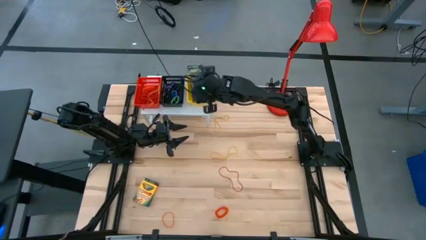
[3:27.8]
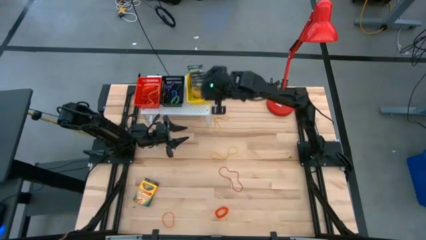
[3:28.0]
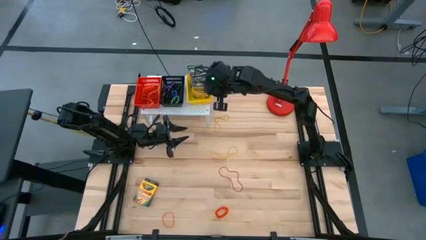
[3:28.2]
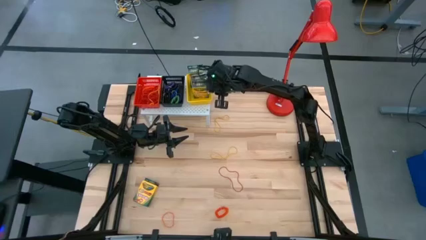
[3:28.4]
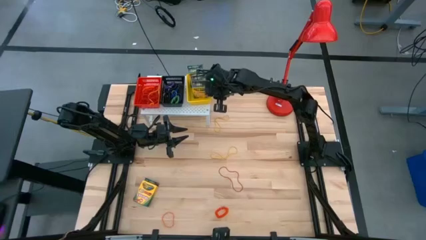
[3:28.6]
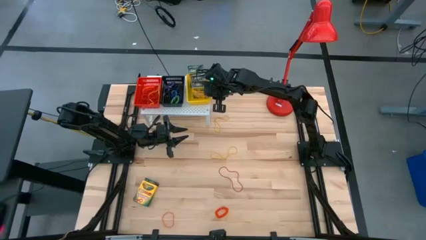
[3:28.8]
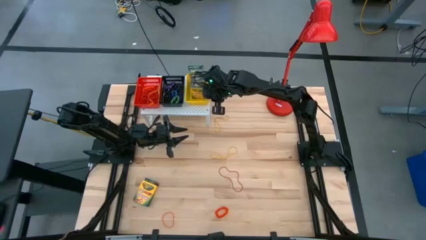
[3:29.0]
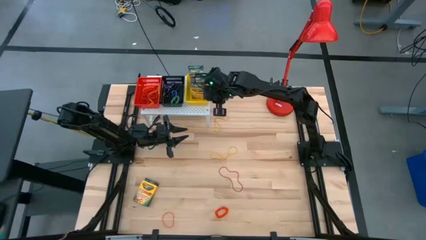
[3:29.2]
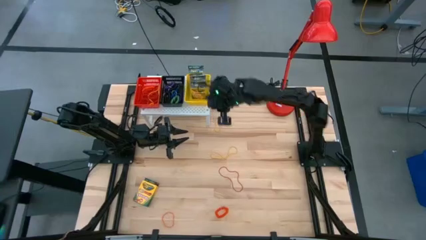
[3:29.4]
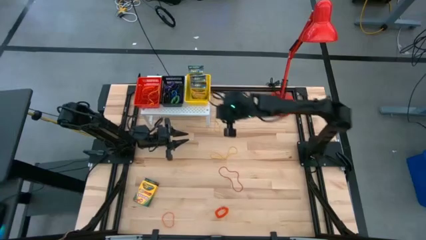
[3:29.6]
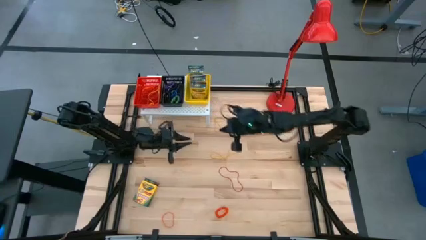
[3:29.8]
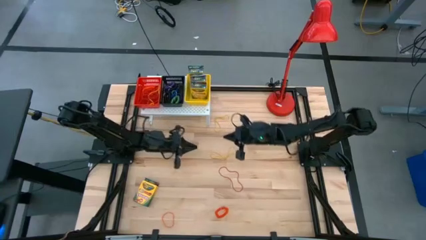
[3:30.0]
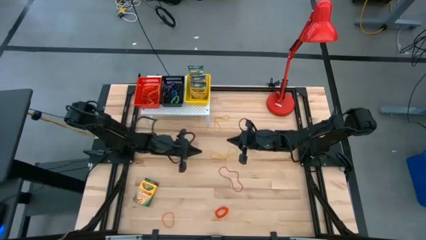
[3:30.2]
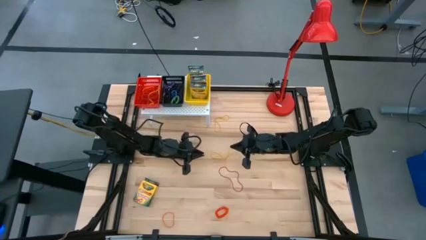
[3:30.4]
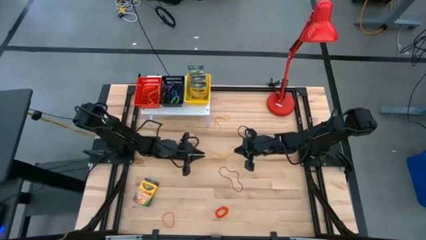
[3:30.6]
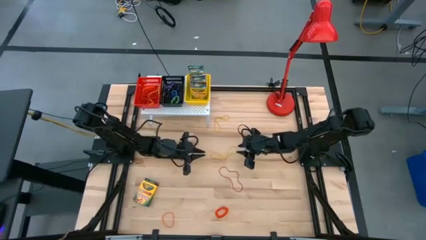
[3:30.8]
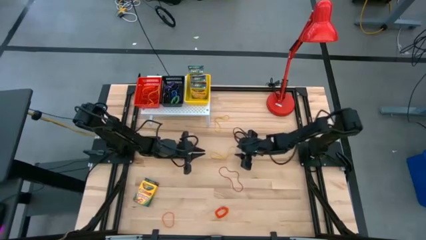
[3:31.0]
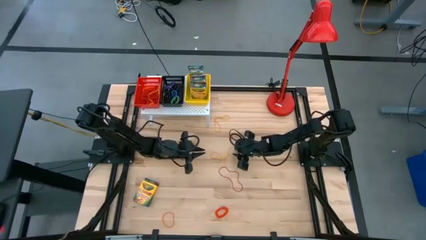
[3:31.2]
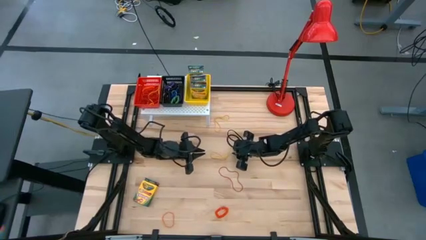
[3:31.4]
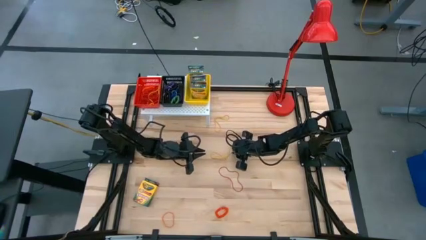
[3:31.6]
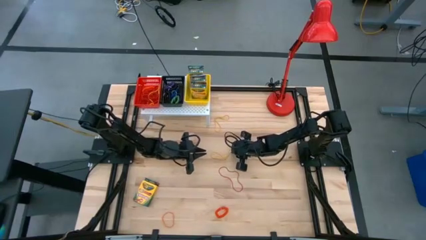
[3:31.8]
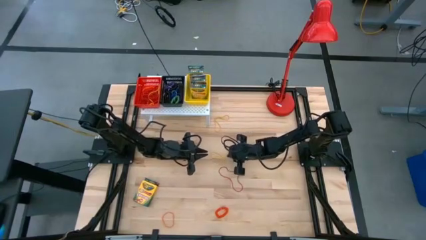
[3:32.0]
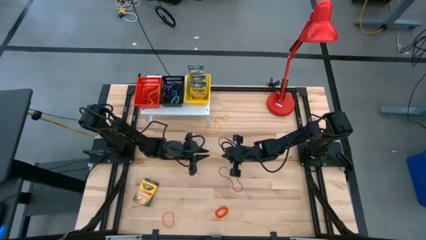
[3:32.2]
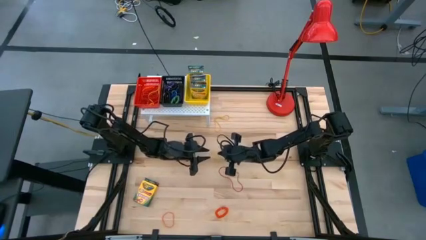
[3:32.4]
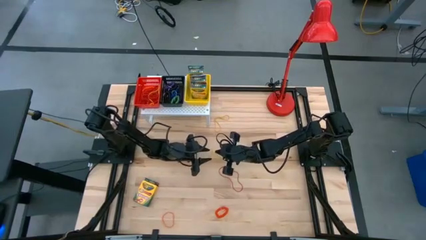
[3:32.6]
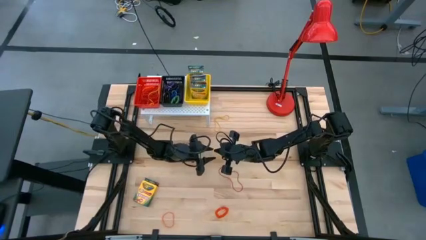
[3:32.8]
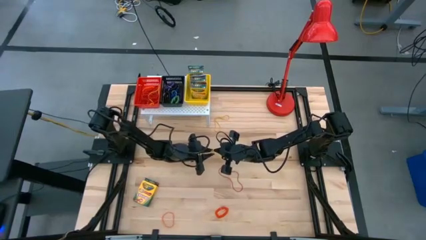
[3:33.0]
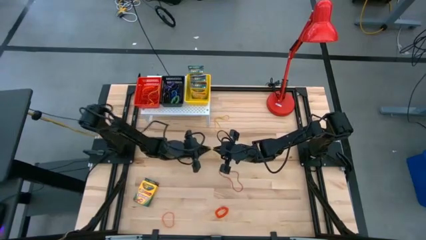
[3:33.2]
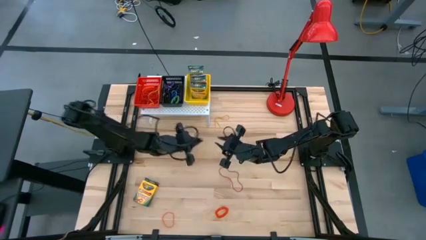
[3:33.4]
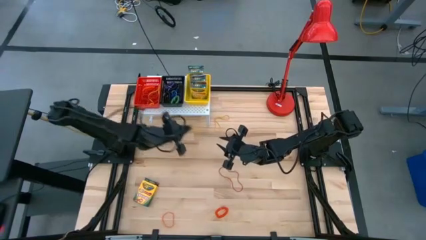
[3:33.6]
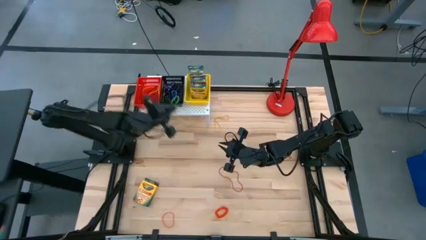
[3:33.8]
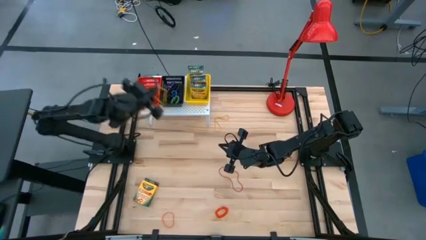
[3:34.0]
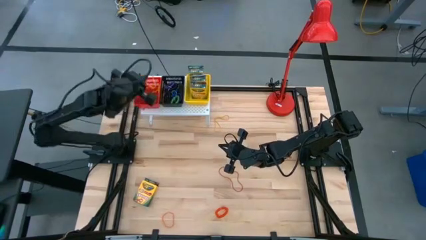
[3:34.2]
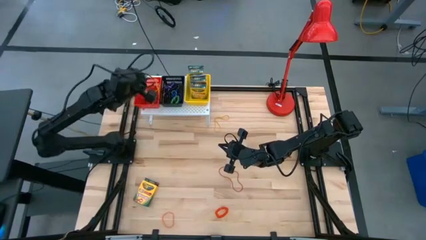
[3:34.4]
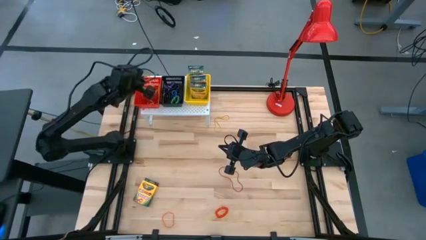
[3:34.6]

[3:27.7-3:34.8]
Task: Pick & Place Office Desk Supplies
Put the yellow rubber band into the red bin on the shelf

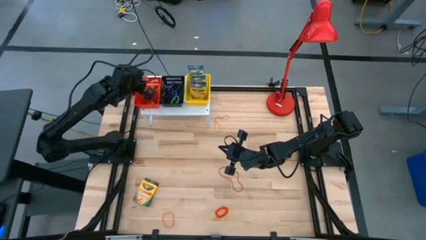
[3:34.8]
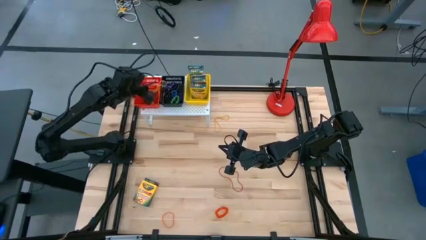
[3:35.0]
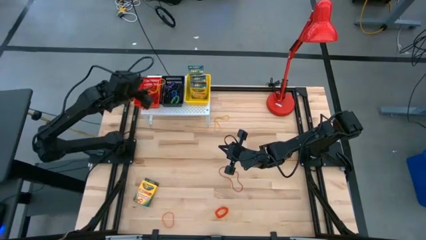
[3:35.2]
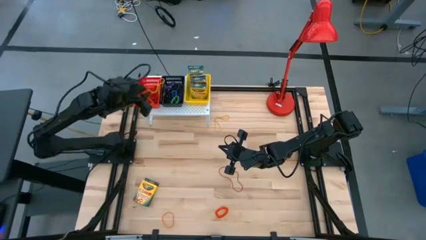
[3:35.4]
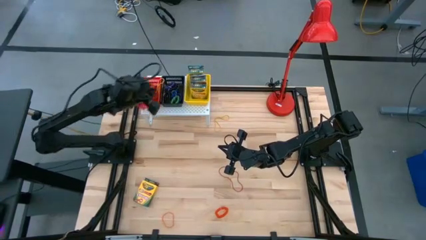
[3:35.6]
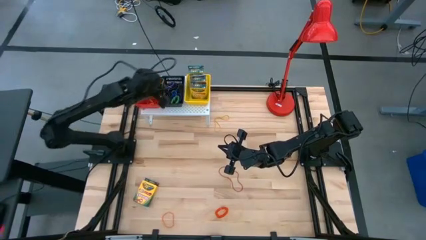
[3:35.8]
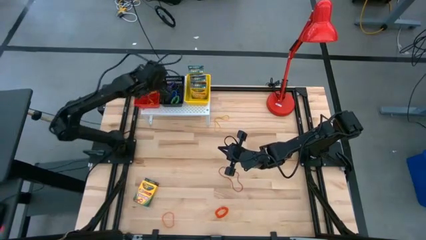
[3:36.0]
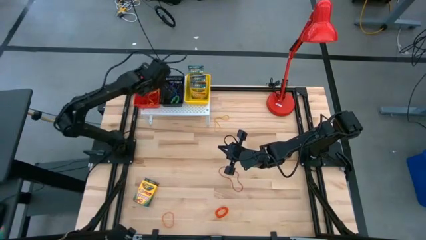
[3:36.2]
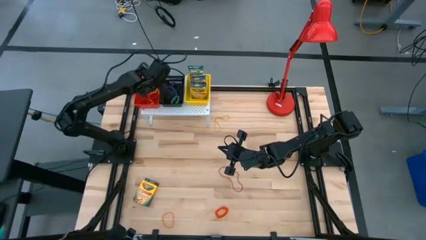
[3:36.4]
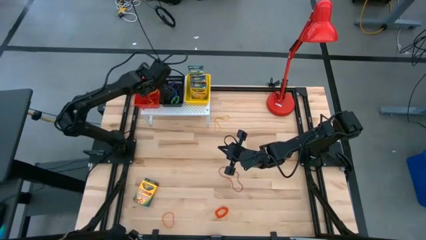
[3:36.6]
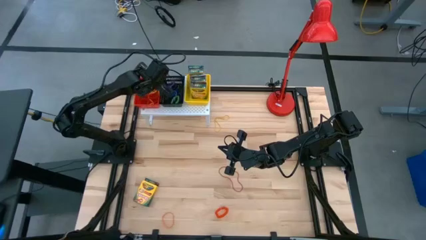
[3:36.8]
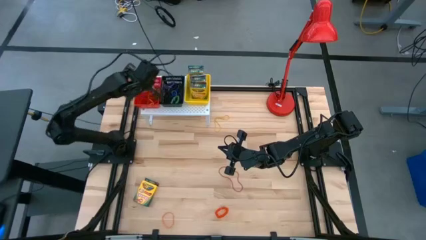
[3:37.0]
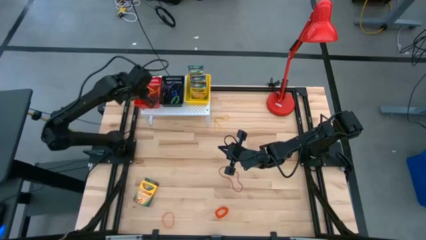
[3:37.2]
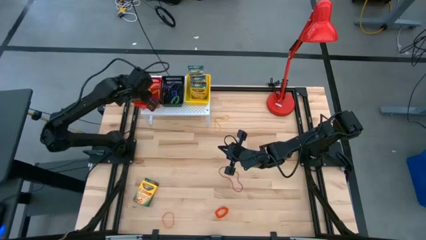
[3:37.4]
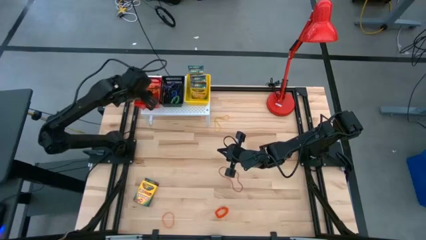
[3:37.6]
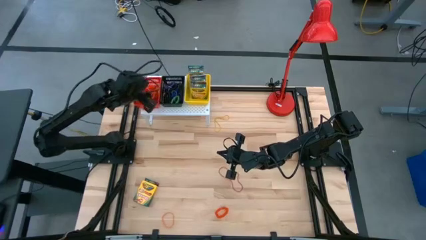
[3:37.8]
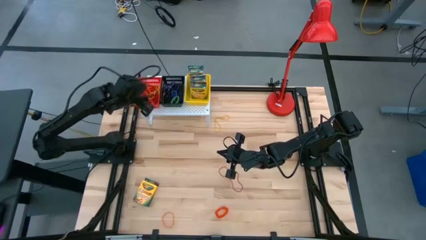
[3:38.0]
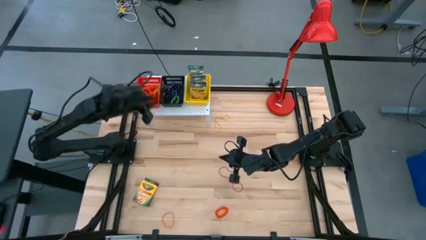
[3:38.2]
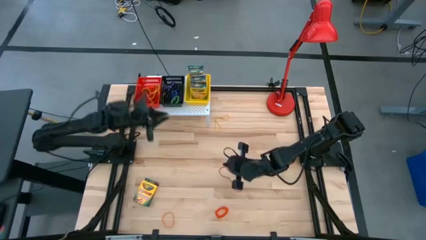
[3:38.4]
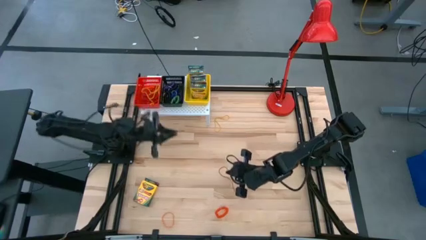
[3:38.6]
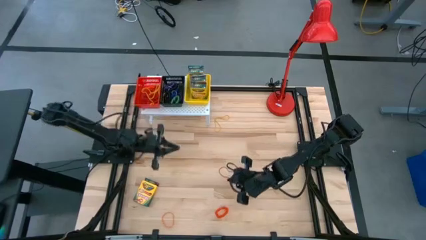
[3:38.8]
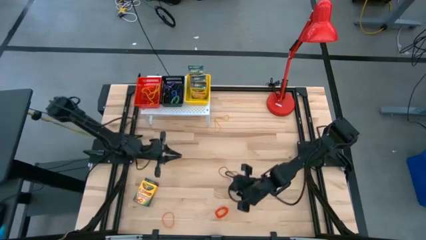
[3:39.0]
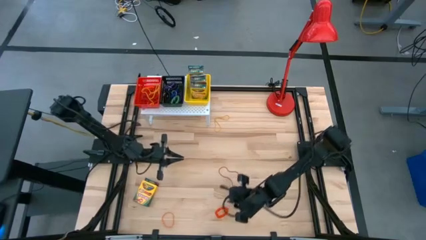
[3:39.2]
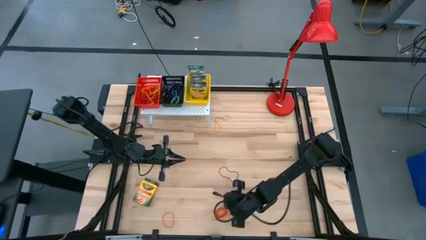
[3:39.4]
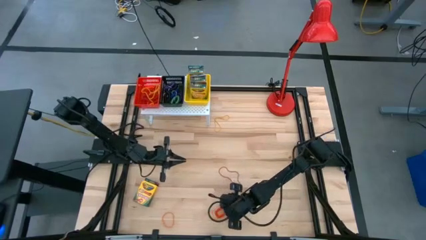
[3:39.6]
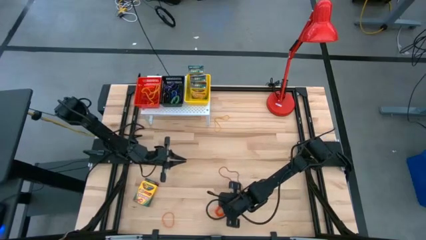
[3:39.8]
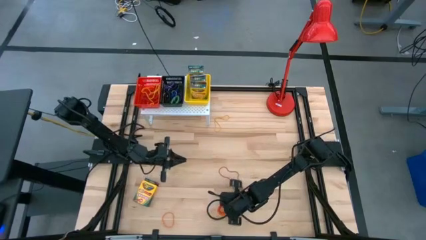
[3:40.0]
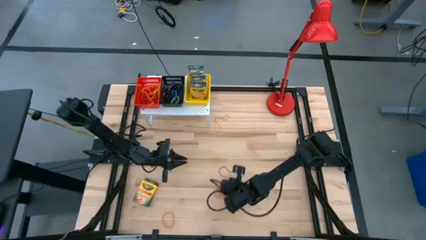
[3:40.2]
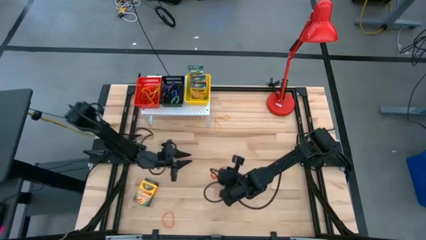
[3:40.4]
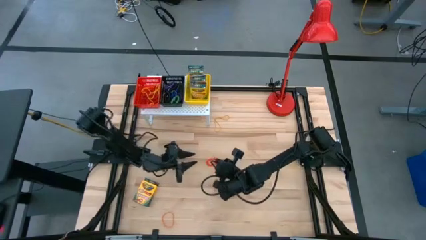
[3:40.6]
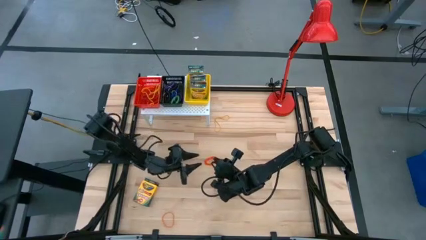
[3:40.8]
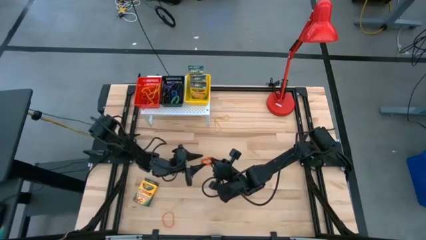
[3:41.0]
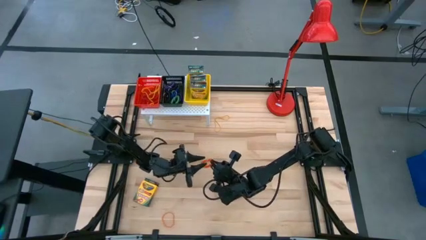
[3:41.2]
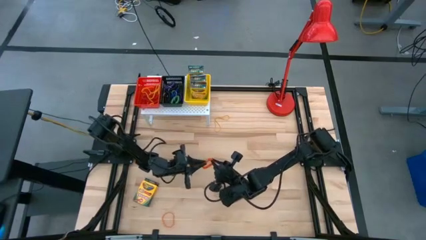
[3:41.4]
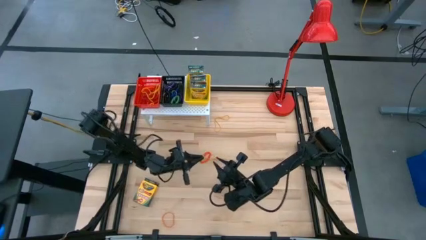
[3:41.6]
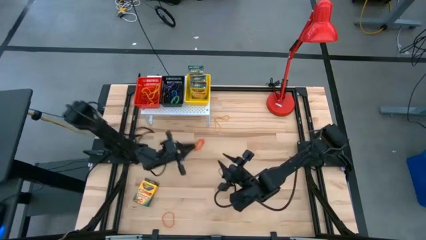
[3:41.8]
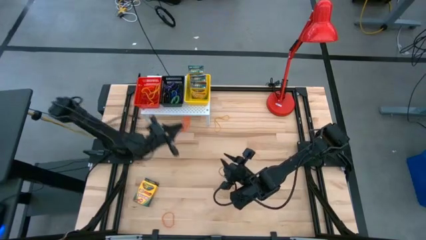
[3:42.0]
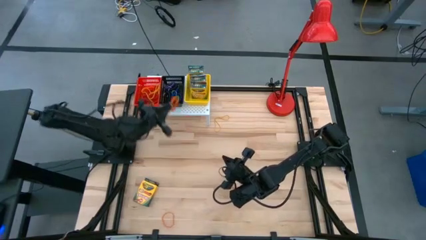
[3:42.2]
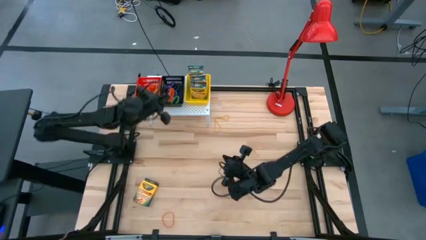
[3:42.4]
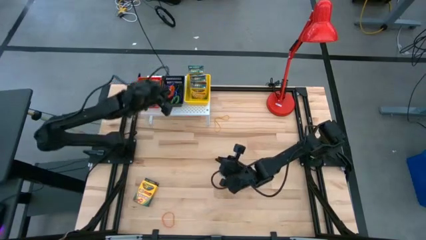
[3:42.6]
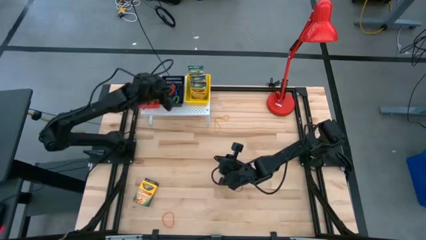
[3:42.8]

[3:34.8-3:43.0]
Put the orange spring keychain into the black bin on the shelf

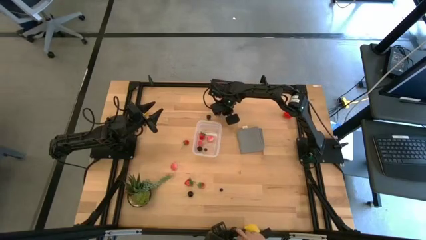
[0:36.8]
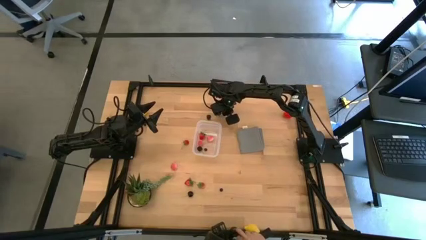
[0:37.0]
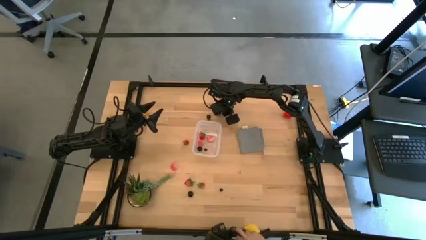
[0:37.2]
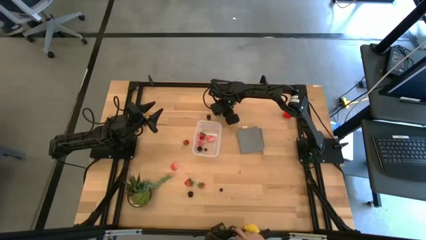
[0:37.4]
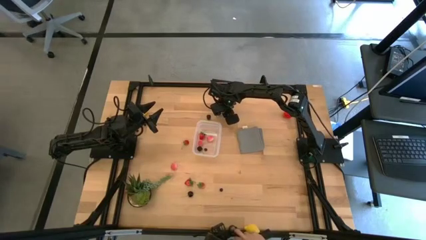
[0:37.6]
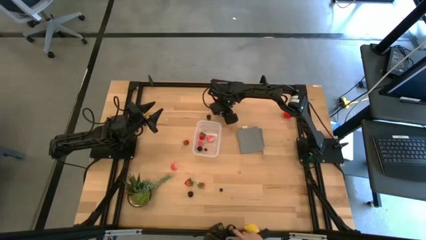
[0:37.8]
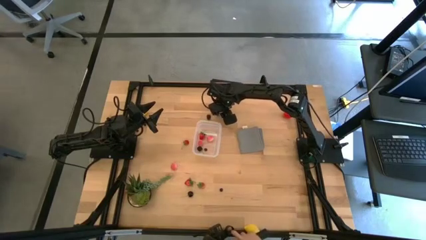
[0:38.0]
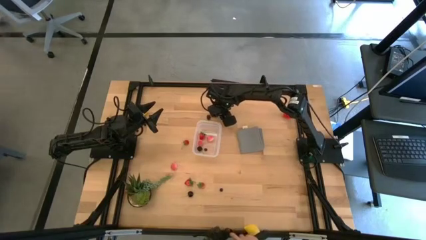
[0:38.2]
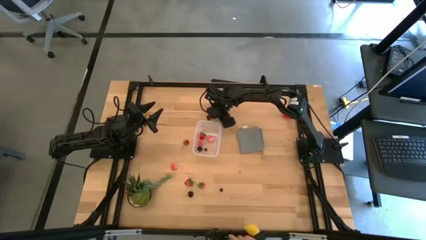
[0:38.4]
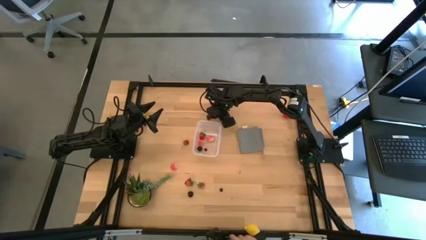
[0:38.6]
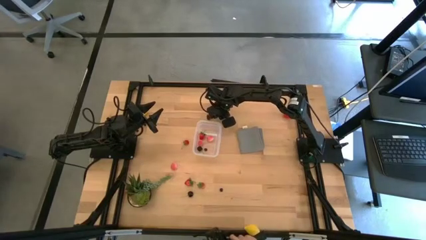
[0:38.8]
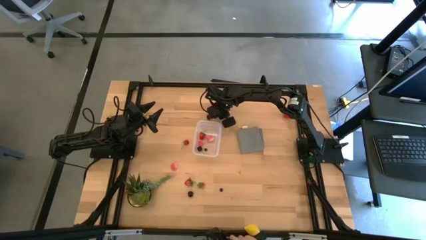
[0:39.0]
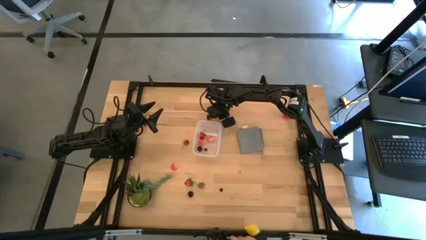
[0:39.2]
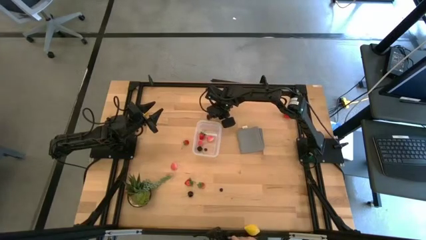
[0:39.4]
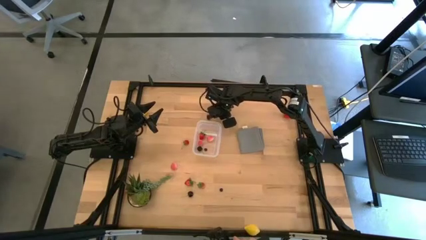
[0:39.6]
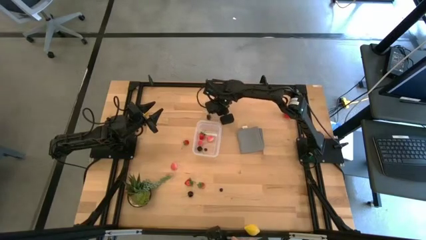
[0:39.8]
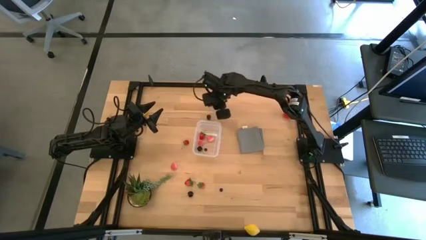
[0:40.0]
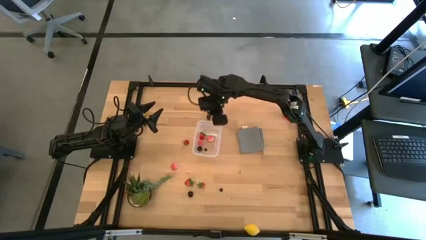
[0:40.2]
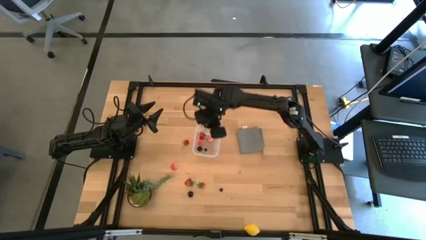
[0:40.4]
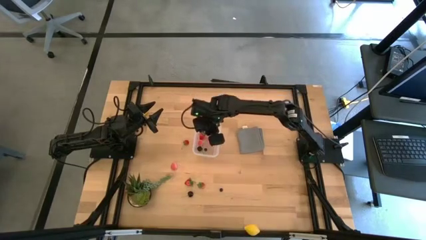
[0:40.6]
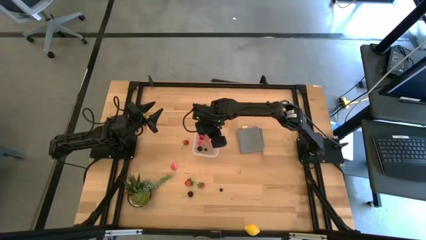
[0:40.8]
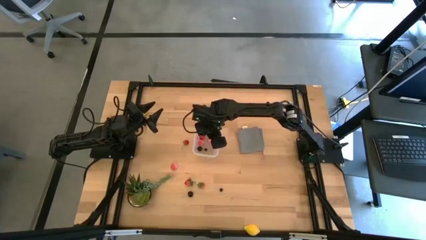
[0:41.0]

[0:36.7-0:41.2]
Task: Pick and placing Produce into tupperware
Put the blackberry into the transparent bin
